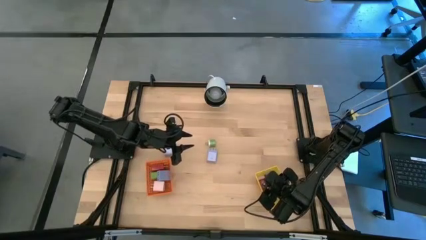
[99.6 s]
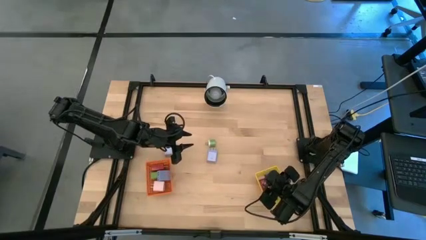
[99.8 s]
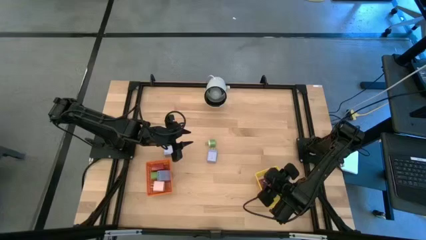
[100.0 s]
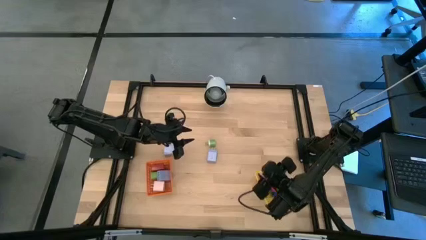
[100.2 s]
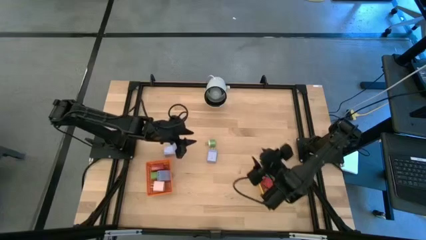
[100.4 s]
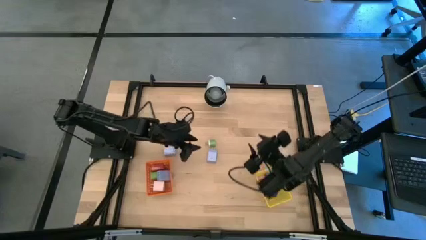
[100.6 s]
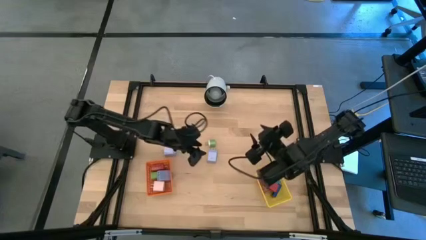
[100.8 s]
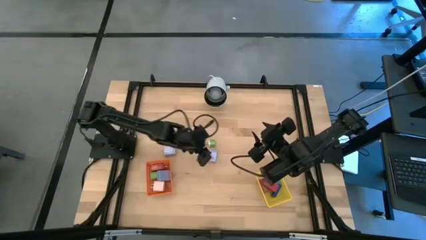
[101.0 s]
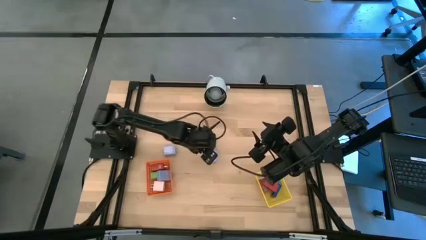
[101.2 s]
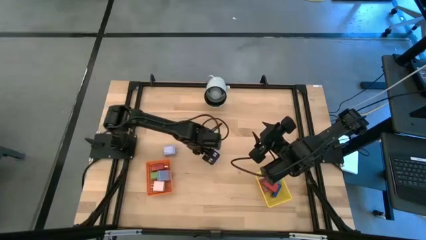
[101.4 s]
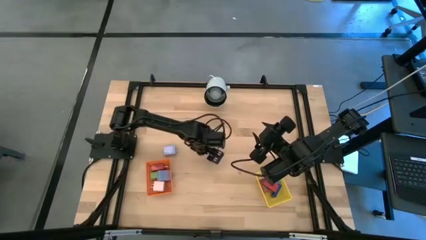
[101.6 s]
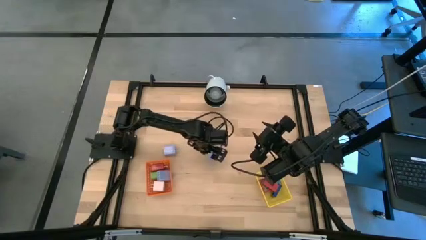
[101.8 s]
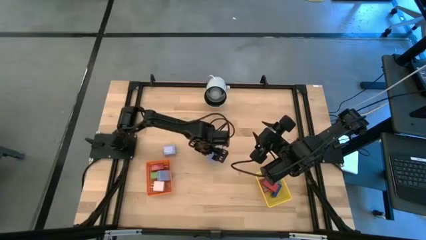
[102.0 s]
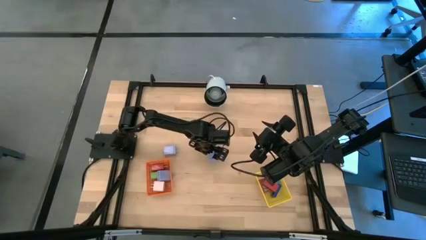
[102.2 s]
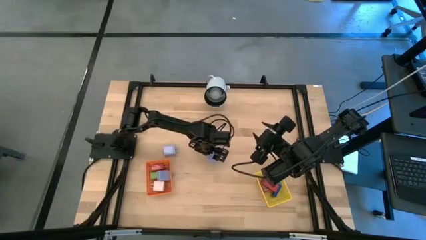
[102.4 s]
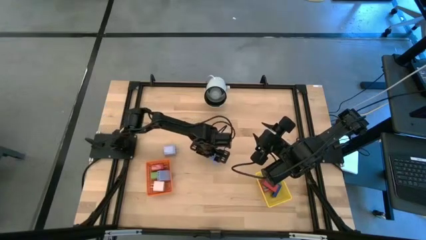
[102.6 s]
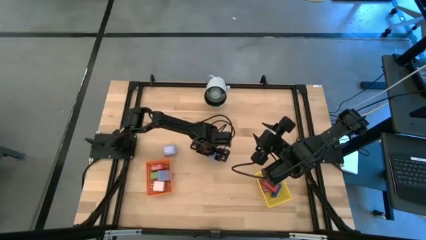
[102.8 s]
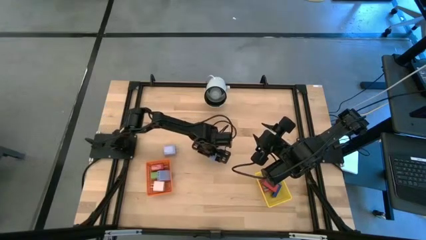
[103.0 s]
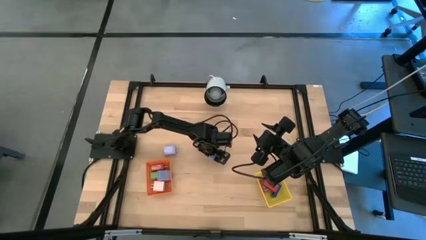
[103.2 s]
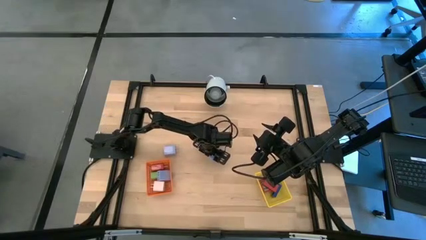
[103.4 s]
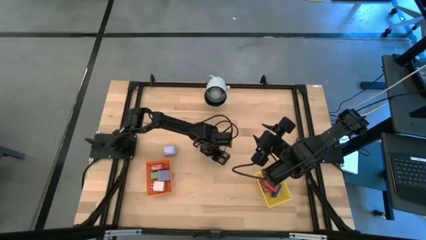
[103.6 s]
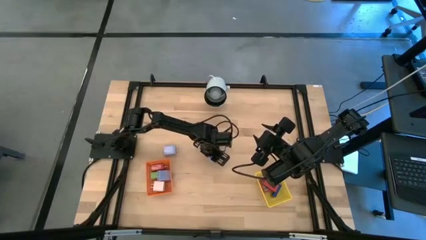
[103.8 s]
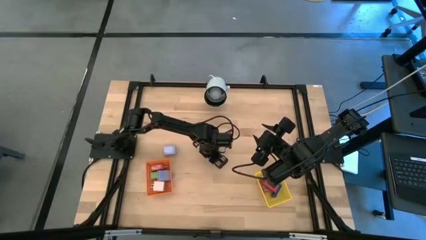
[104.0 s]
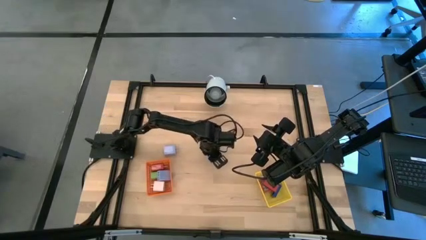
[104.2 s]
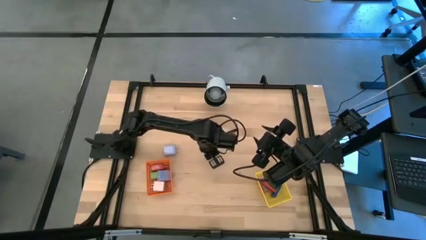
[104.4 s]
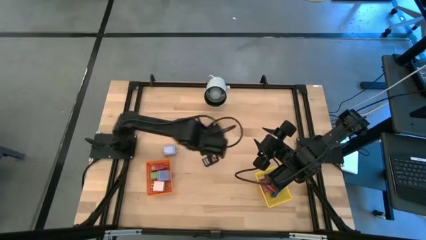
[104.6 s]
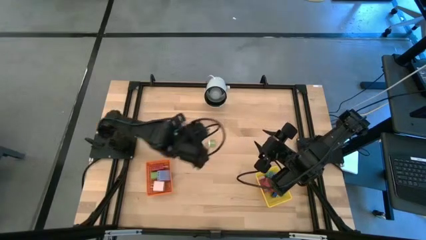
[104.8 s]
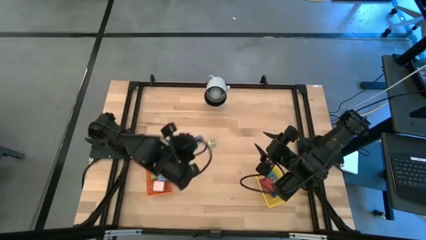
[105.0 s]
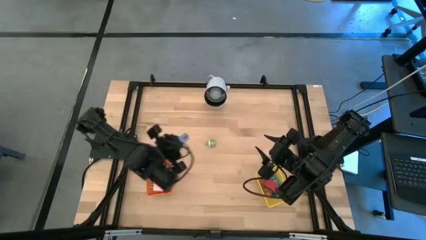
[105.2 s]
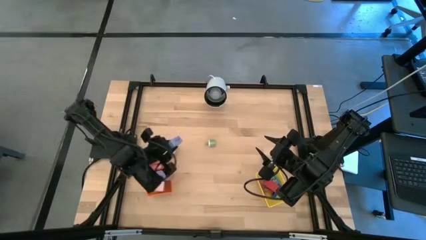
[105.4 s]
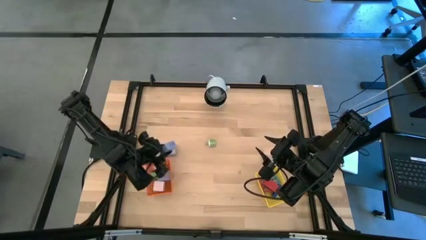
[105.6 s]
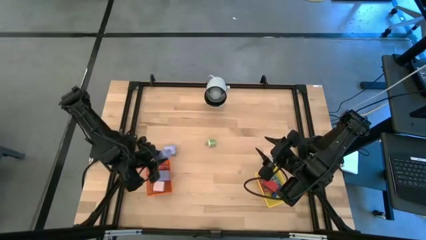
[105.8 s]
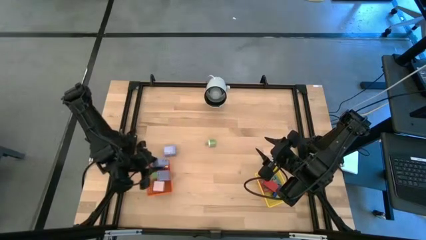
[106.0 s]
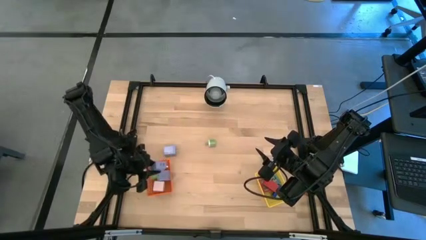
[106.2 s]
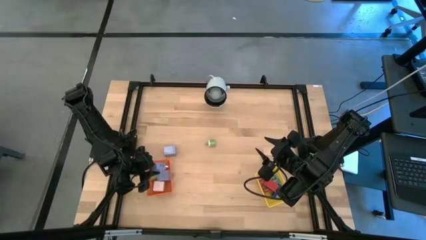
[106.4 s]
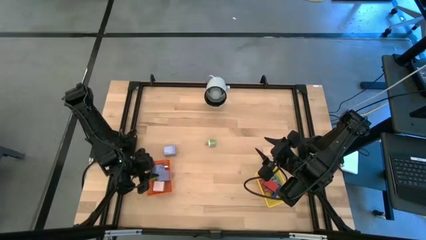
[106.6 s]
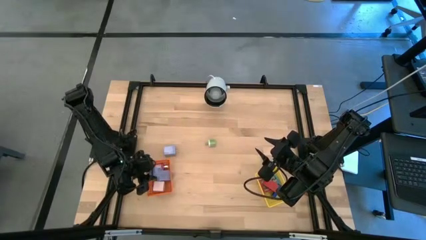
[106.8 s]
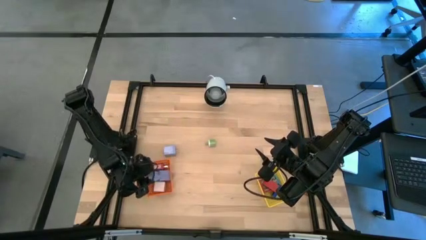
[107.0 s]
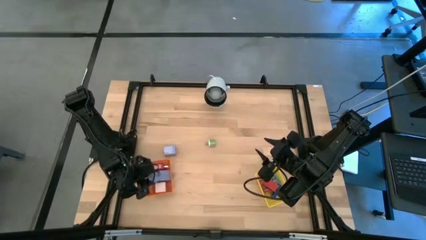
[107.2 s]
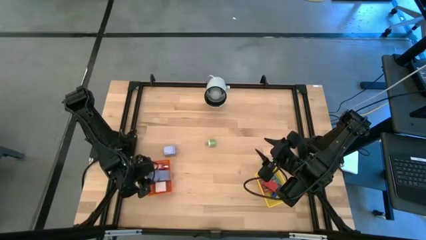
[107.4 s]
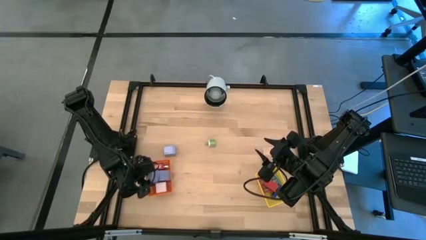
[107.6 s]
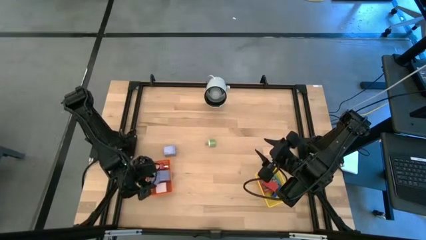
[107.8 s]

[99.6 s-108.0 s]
Task: Pick & Place Office items
Put the right light blue charger adapter into the orange basket

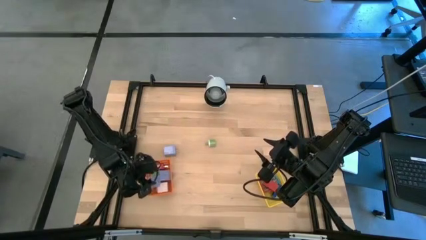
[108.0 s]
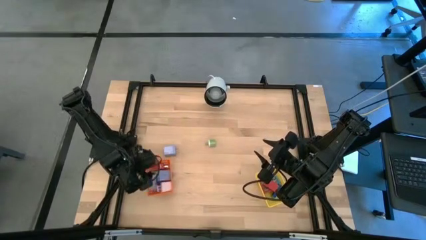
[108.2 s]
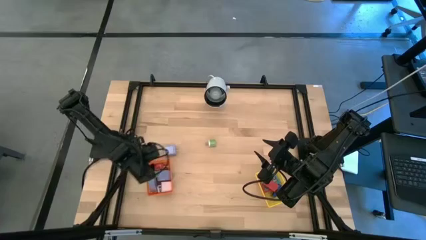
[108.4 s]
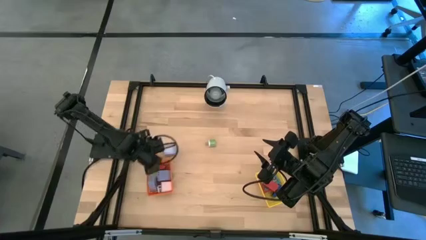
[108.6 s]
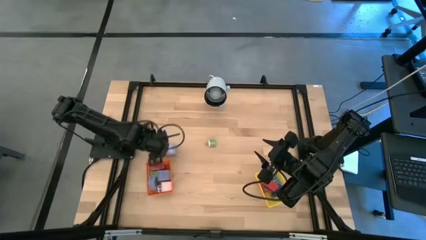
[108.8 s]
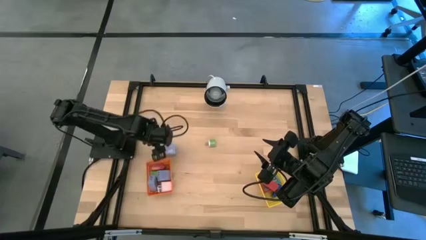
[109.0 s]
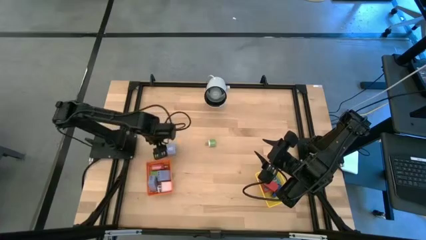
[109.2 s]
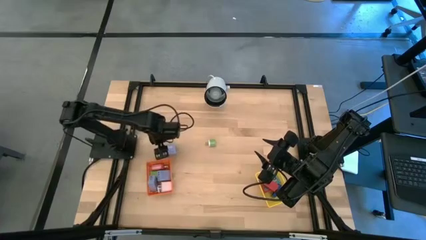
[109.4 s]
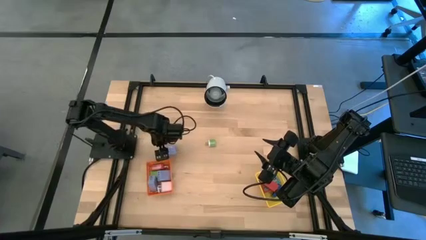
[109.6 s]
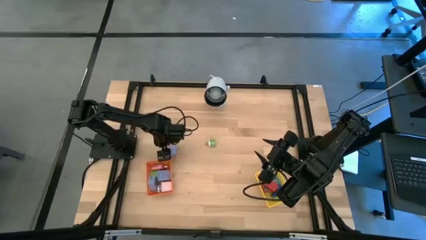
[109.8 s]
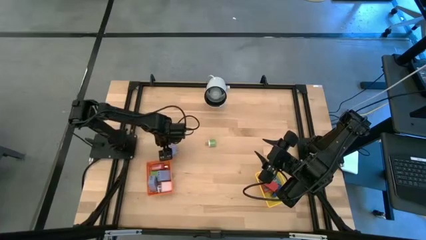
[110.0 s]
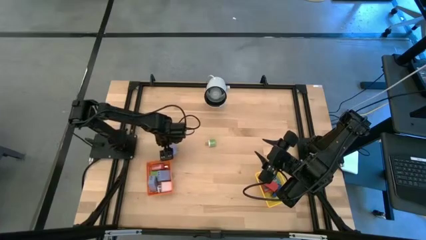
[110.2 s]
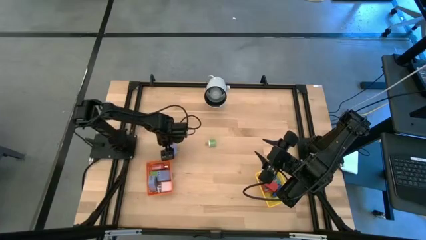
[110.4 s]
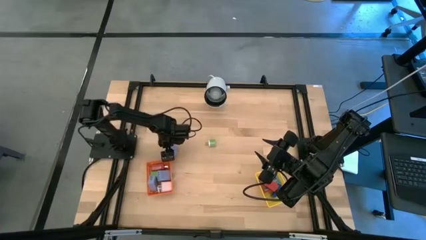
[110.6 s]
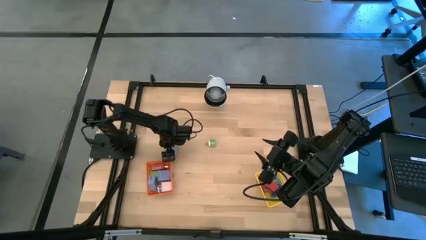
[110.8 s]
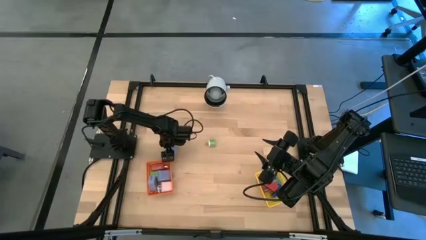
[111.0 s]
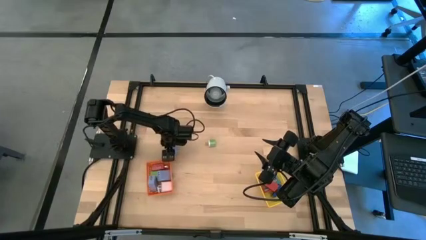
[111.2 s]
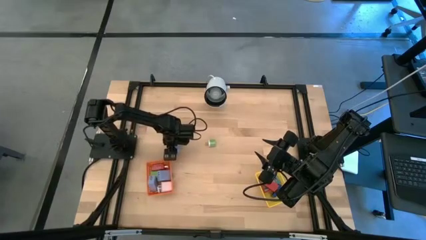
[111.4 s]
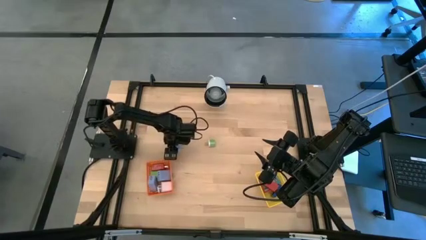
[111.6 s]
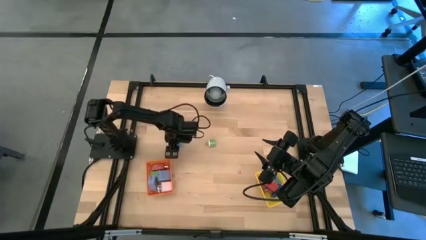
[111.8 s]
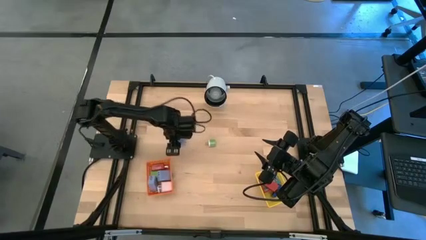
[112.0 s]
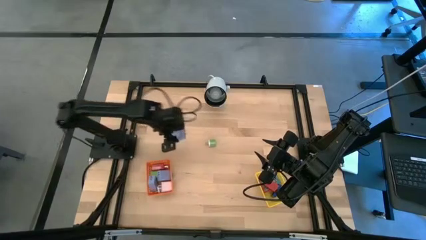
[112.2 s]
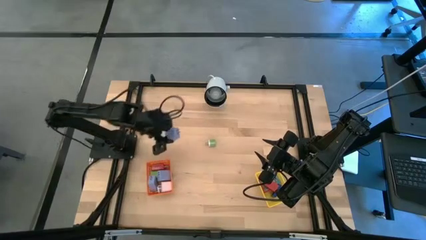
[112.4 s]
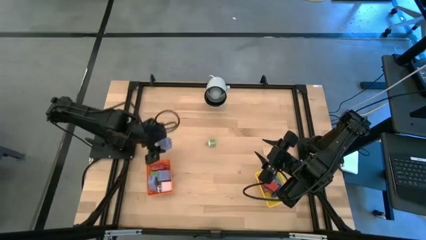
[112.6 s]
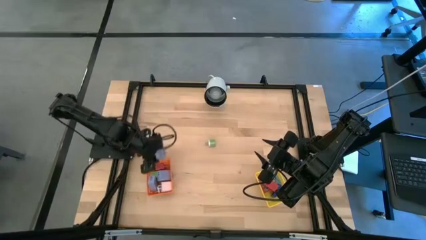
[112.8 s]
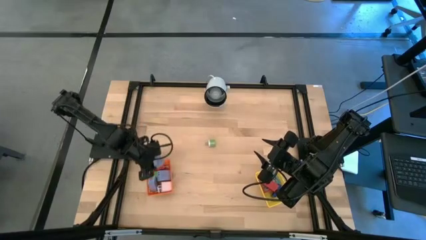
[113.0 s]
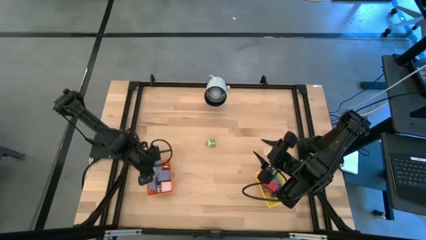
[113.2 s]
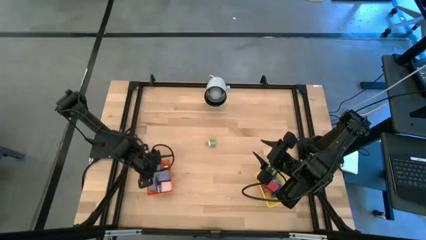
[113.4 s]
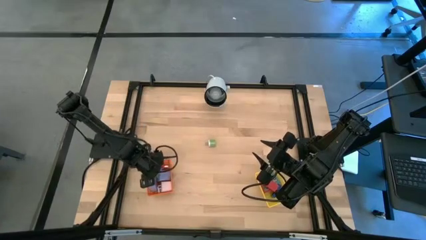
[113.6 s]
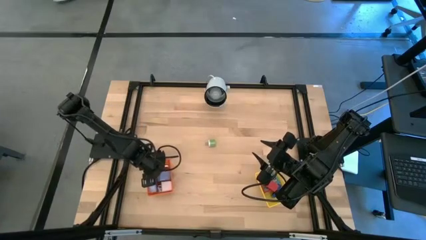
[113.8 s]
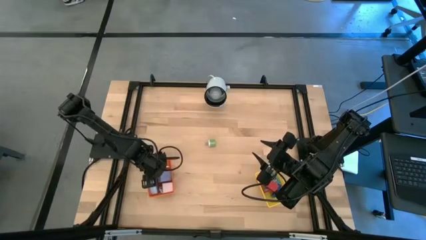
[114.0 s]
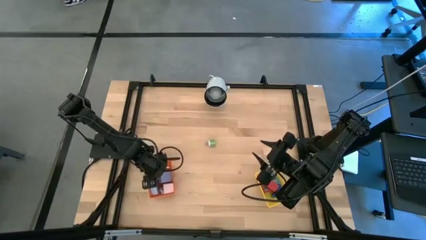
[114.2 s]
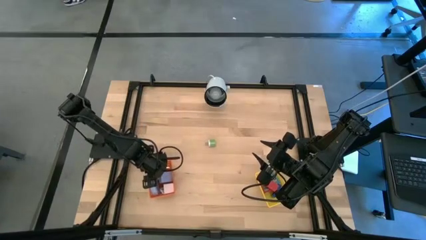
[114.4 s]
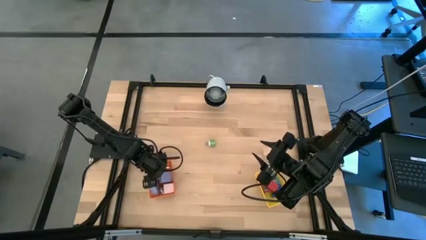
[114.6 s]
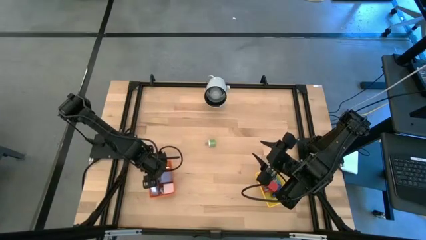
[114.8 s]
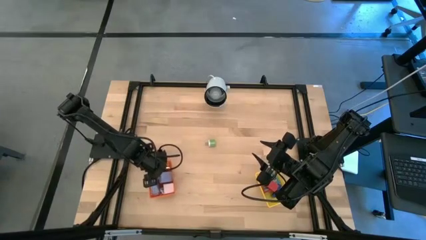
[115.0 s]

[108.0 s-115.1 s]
Put the light blue charger adapter into the orange basket

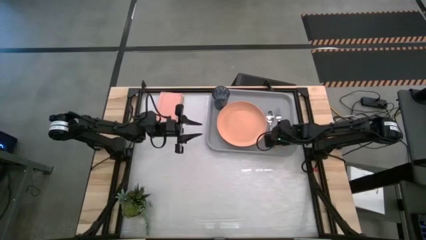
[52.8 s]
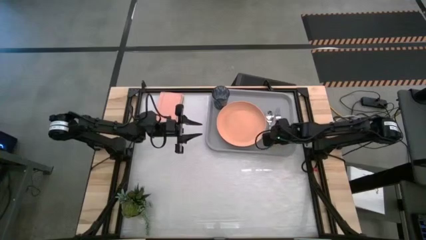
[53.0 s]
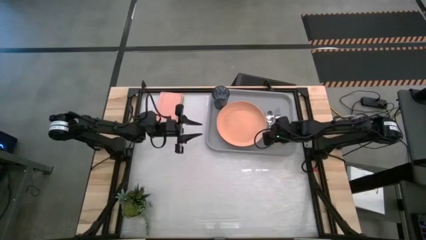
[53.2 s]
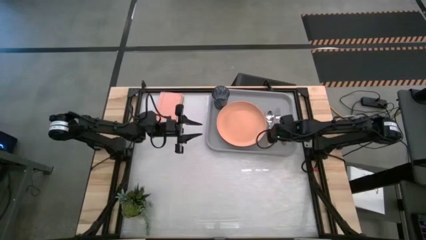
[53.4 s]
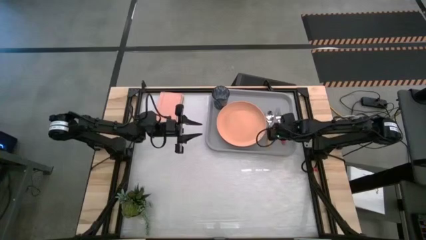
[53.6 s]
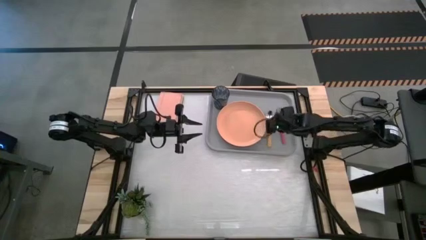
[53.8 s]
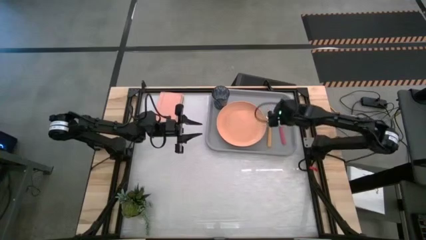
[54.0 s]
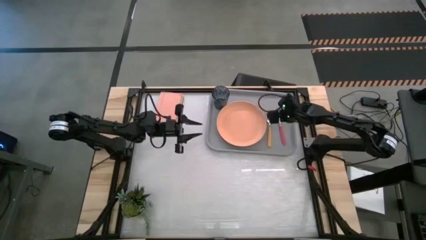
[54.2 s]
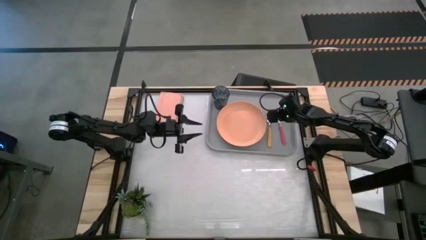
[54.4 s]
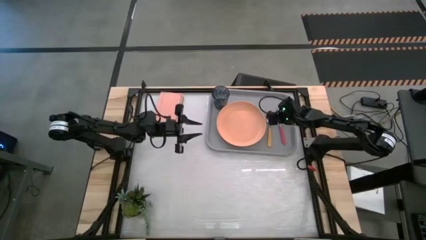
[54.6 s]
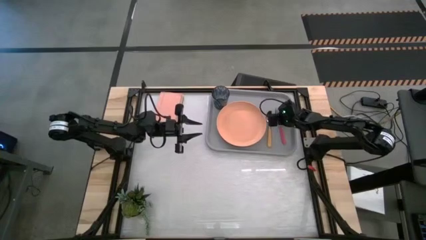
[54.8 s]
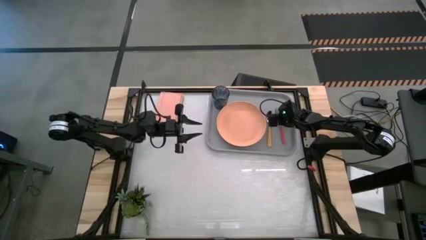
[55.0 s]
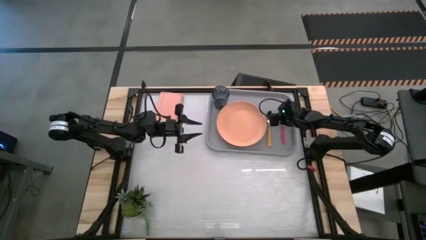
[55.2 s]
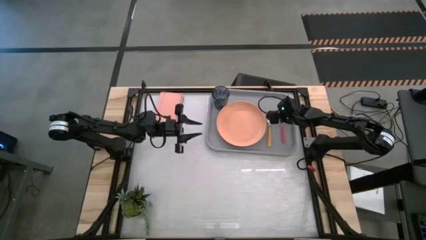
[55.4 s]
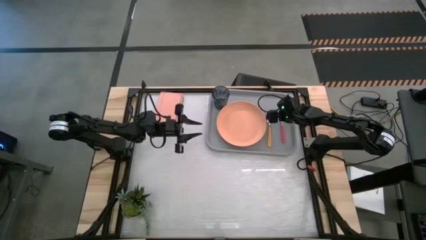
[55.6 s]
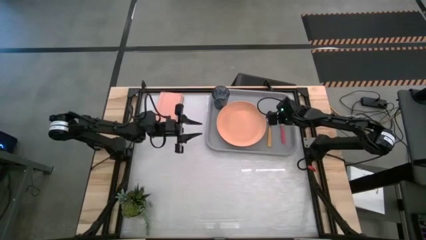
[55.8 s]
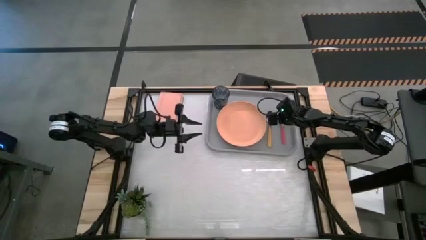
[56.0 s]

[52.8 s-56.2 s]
Task: Pick and place plate/cup/fork/spoon on tray
Adjust the red fork slightly to the right
